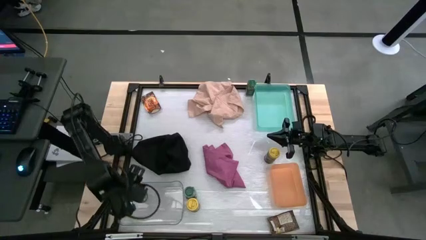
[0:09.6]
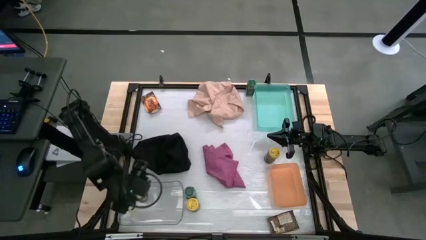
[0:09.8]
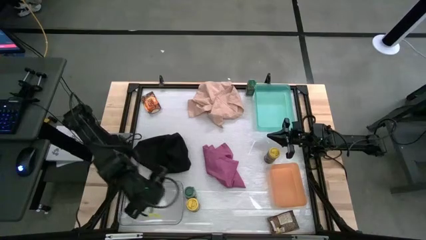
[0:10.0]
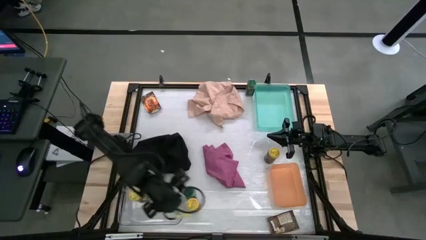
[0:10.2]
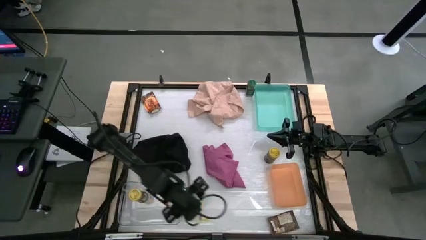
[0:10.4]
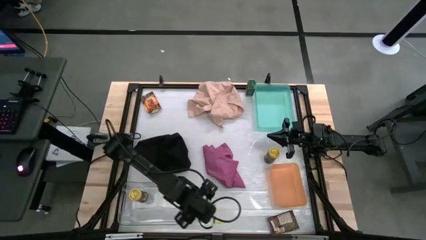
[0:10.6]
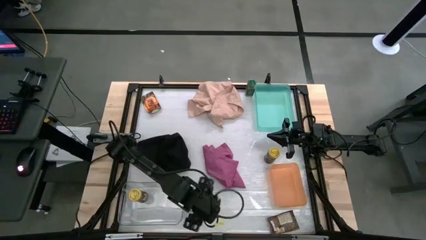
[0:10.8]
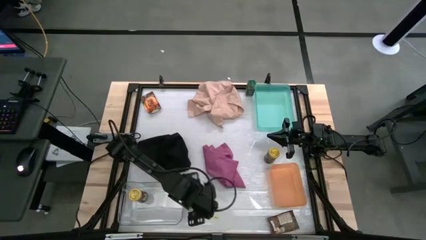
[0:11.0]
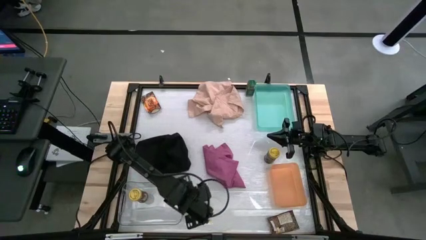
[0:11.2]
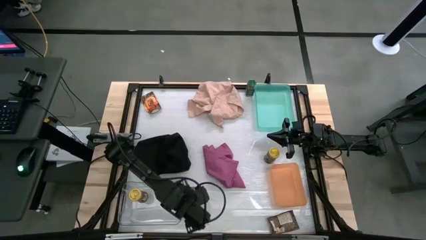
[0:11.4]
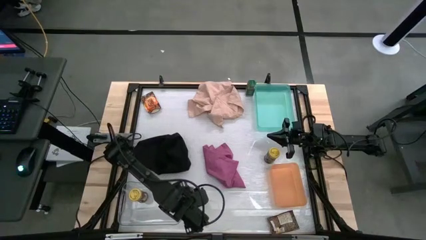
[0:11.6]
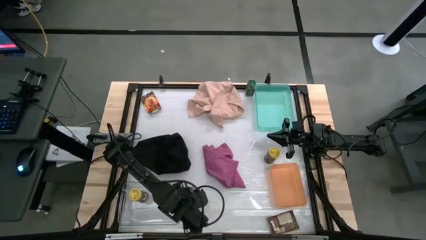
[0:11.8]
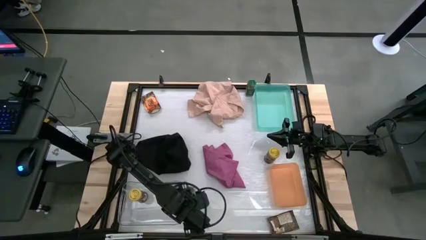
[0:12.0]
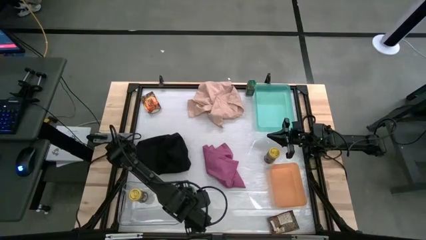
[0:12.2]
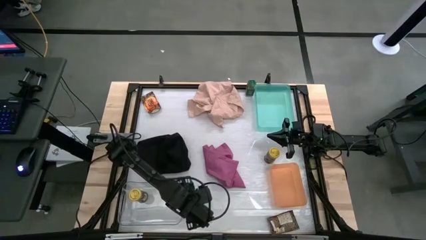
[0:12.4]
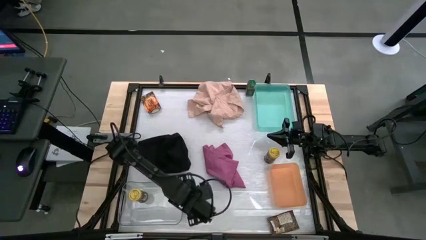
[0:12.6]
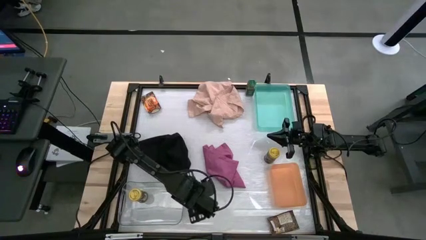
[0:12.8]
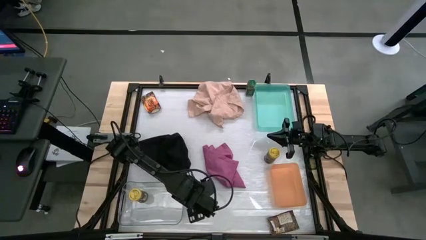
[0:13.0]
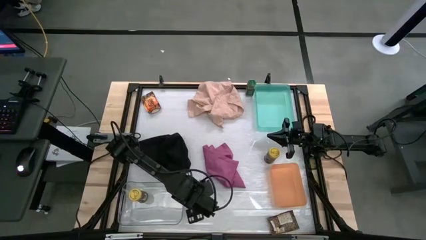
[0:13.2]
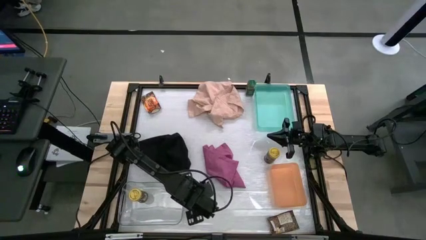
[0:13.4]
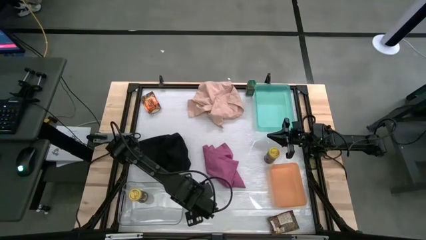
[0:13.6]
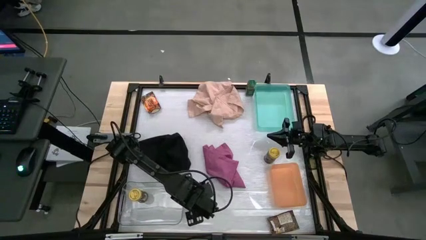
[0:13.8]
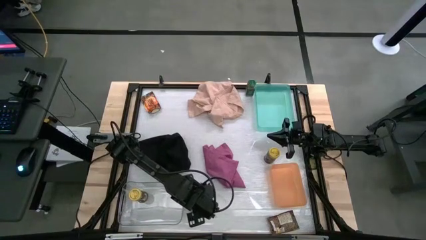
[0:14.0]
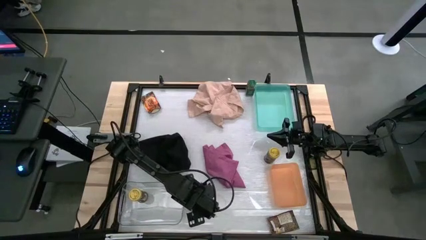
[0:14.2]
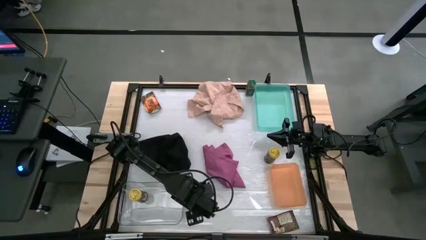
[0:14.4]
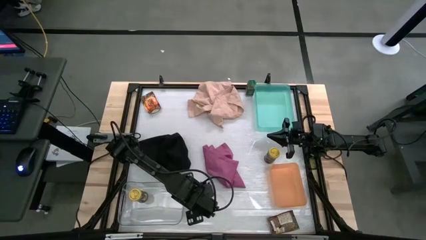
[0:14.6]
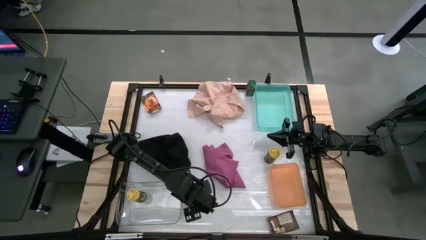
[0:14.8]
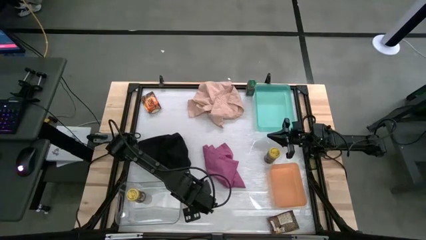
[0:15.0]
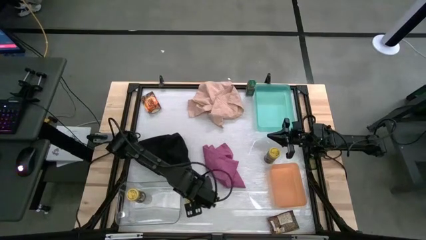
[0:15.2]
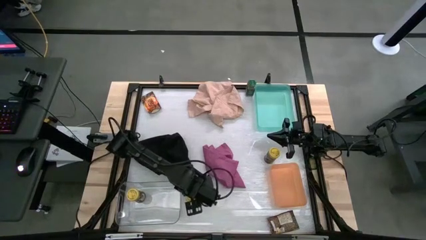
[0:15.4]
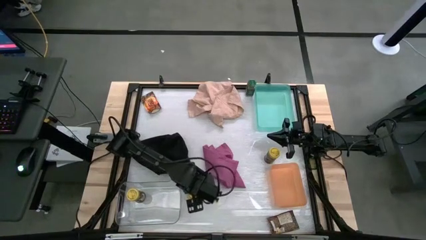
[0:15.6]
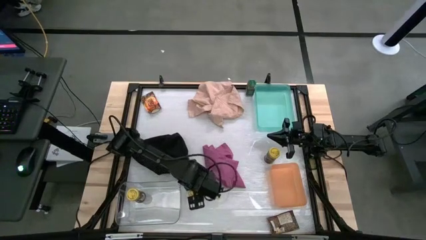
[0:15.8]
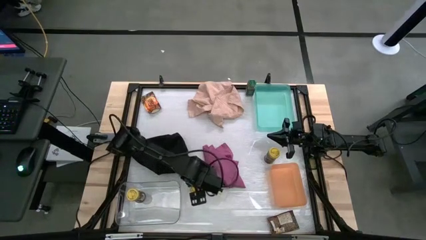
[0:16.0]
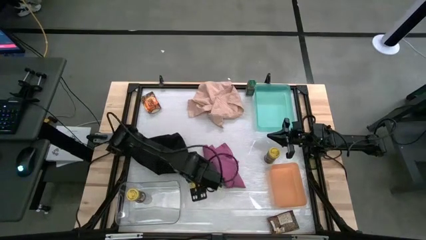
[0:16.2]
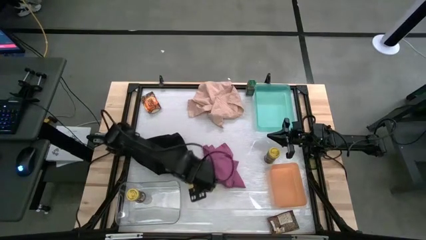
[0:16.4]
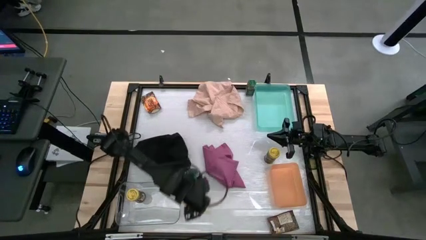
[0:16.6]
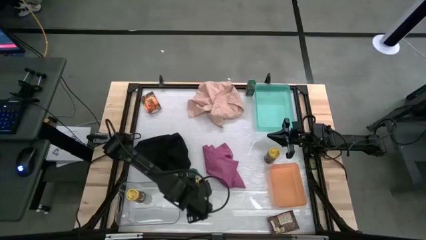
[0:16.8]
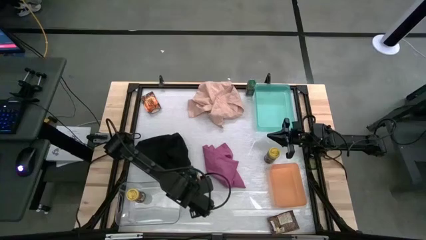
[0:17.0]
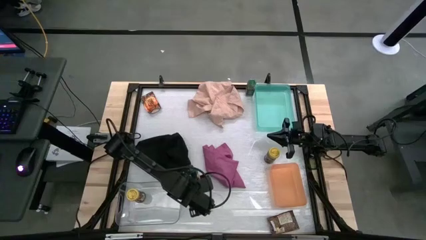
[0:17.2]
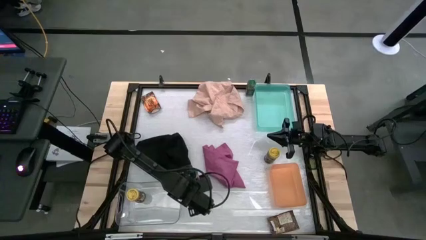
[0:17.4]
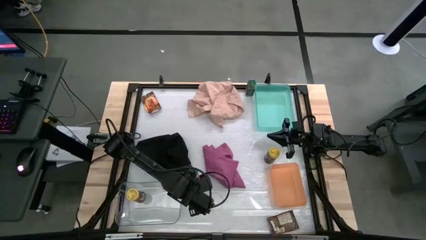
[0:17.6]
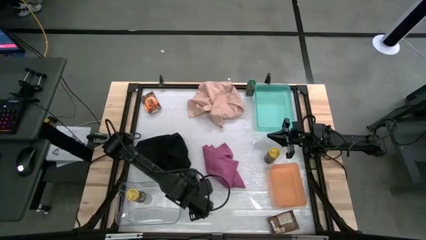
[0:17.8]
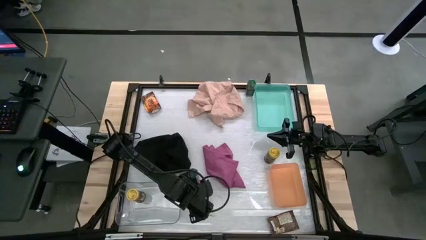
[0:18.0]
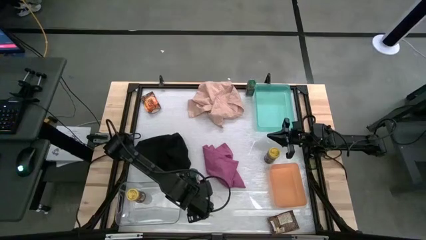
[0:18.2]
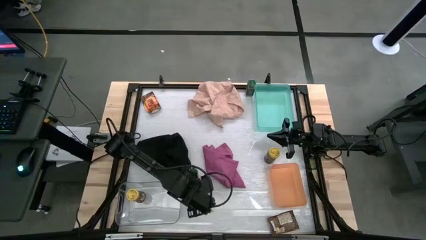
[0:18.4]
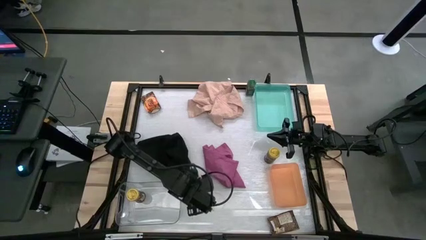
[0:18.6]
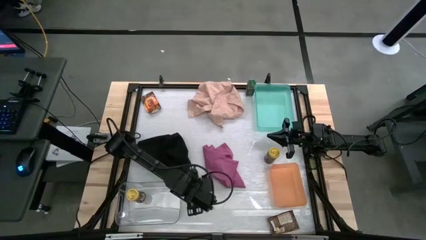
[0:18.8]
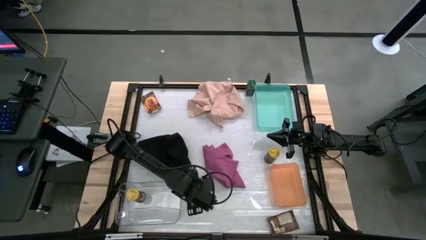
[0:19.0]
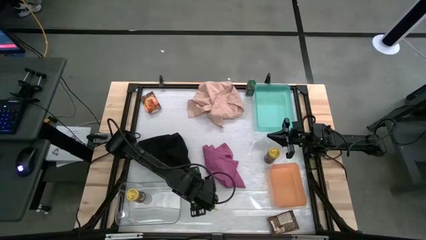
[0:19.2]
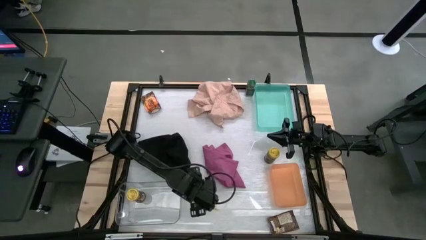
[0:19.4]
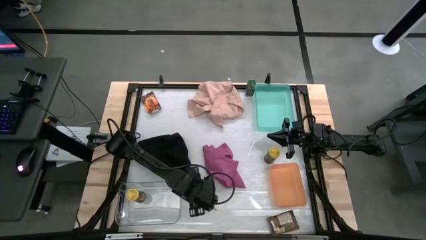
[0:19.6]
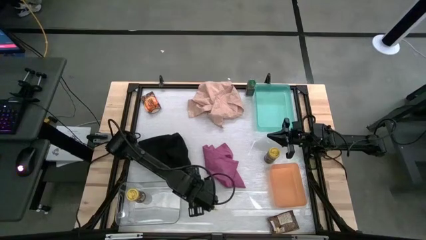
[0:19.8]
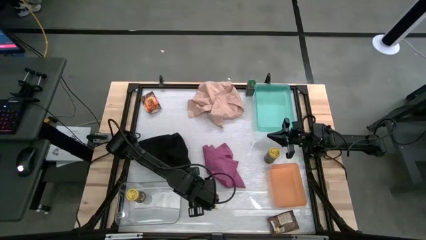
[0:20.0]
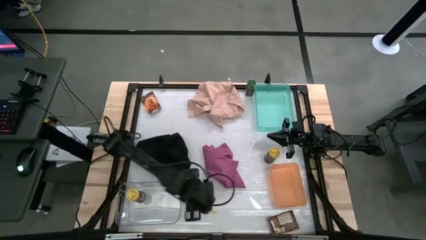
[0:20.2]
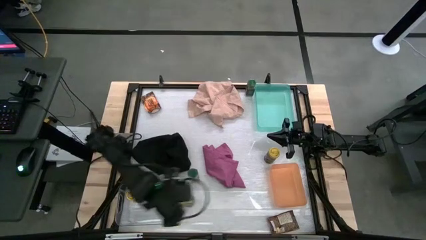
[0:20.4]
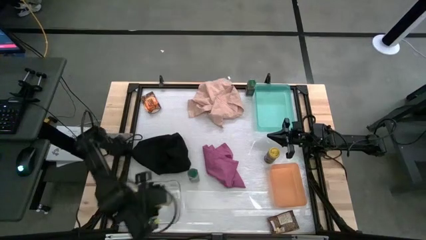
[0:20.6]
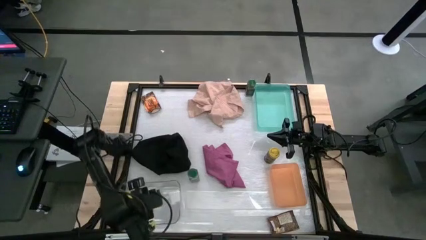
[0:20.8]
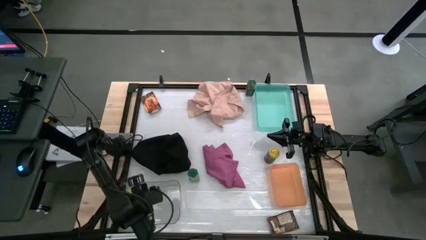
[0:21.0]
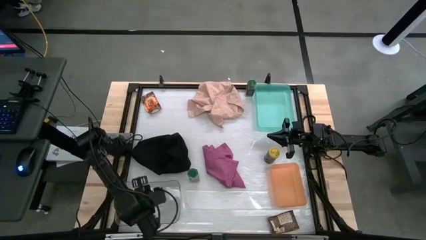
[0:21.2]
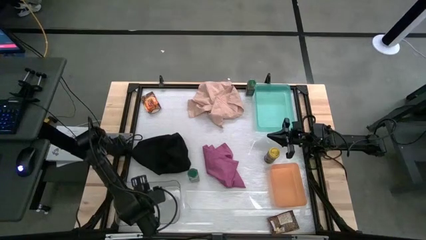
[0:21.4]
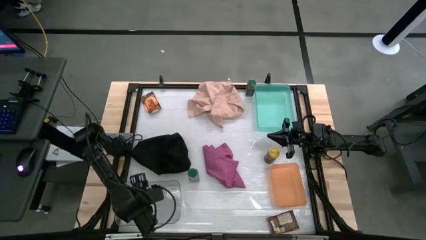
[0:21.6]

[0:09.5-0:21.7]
Task: Sort spices by type
Put the bottom yellow seasoning bottle into the transparent bin

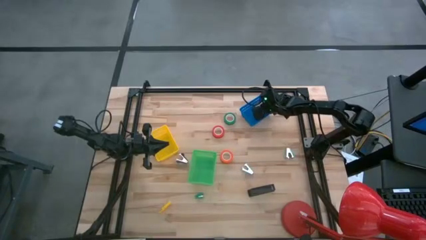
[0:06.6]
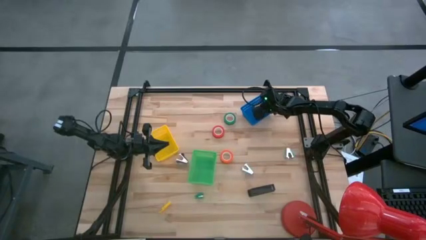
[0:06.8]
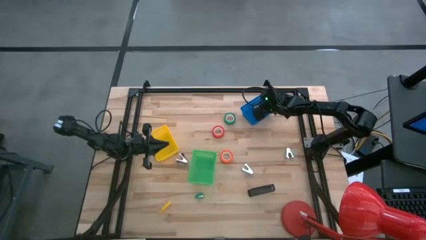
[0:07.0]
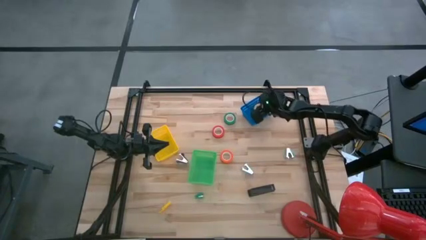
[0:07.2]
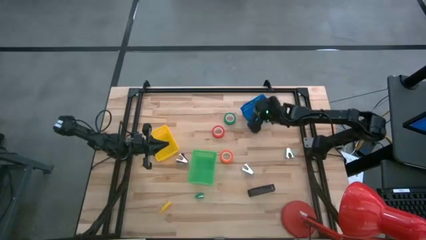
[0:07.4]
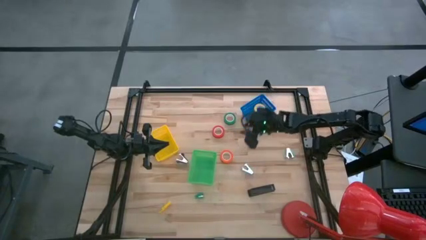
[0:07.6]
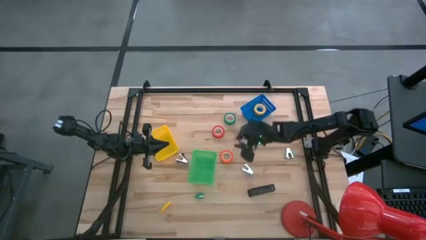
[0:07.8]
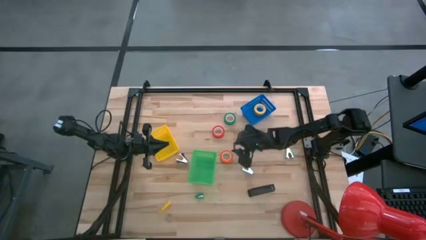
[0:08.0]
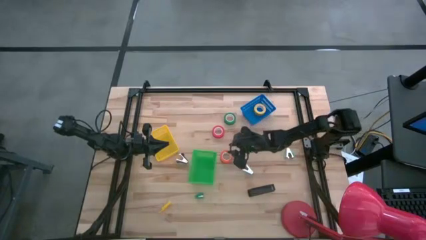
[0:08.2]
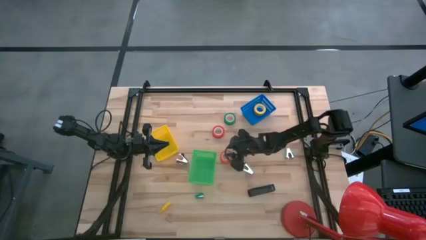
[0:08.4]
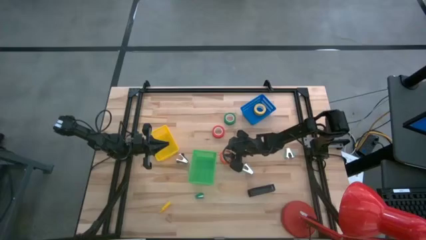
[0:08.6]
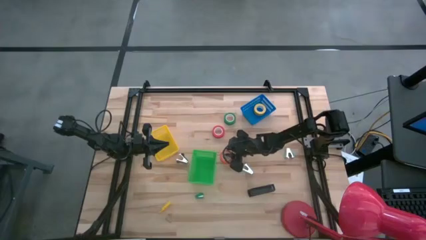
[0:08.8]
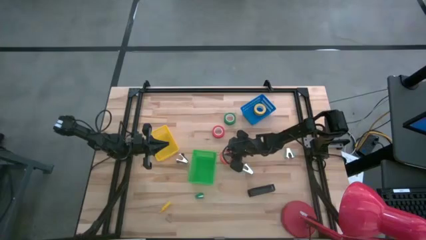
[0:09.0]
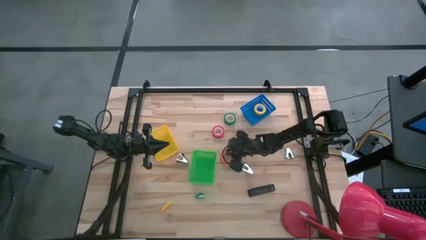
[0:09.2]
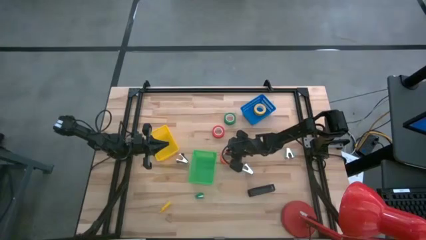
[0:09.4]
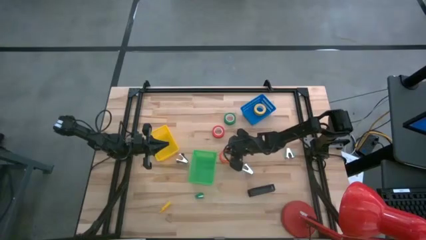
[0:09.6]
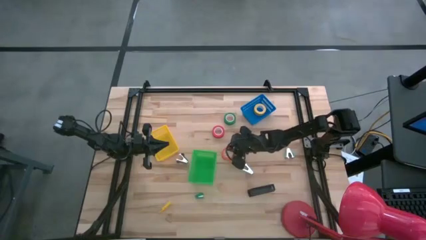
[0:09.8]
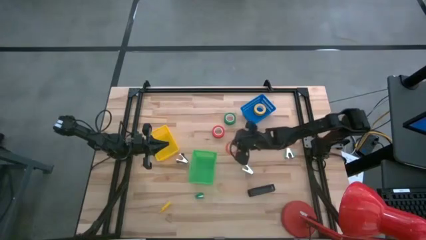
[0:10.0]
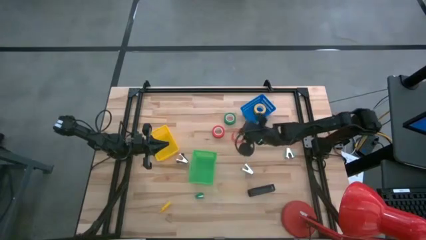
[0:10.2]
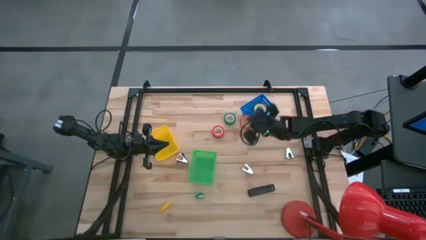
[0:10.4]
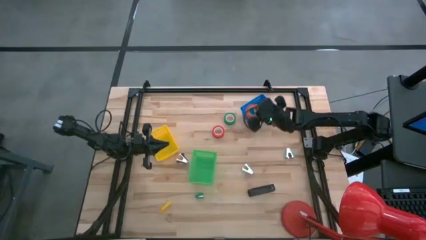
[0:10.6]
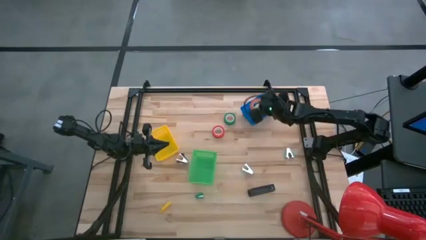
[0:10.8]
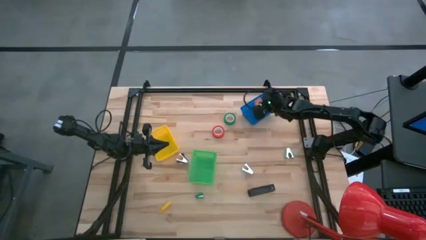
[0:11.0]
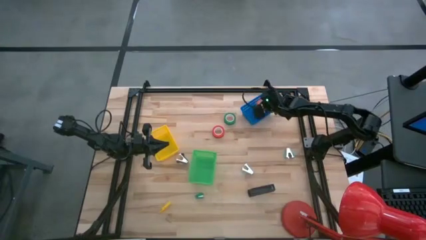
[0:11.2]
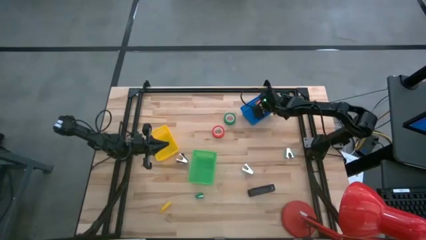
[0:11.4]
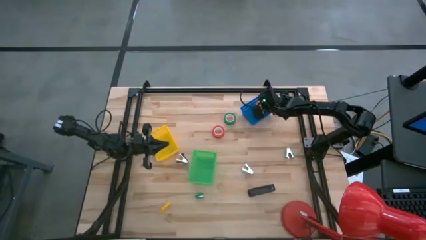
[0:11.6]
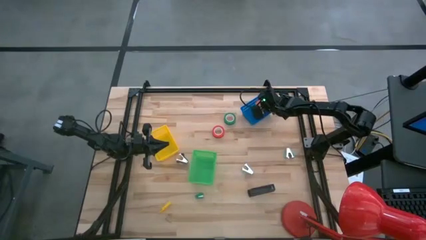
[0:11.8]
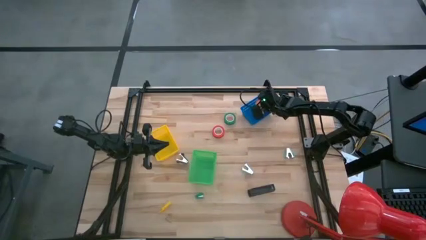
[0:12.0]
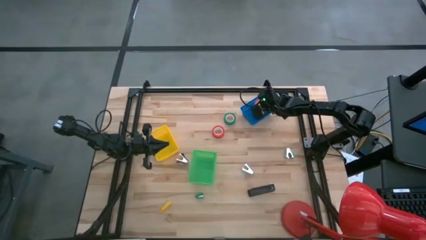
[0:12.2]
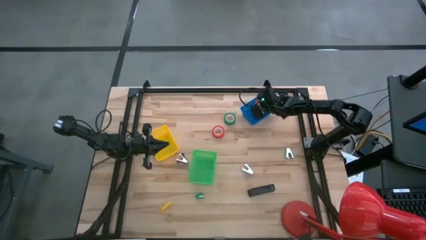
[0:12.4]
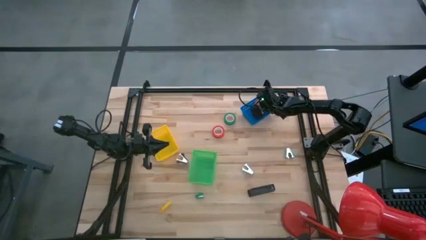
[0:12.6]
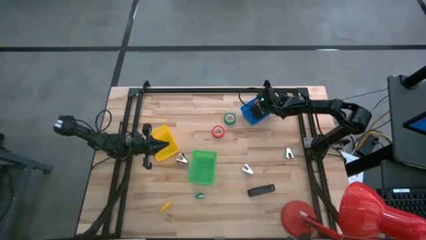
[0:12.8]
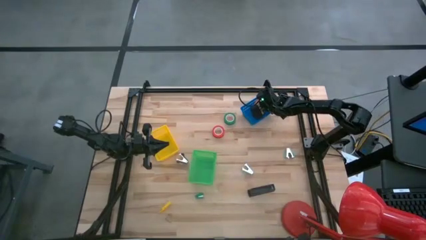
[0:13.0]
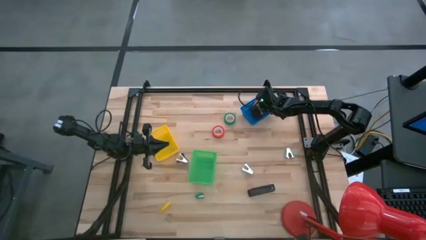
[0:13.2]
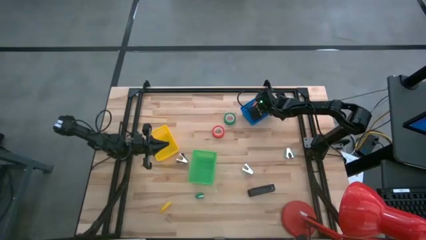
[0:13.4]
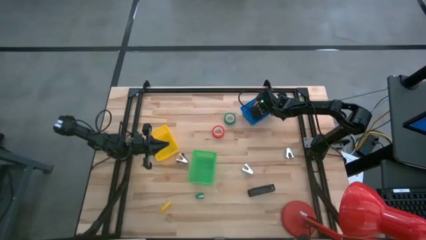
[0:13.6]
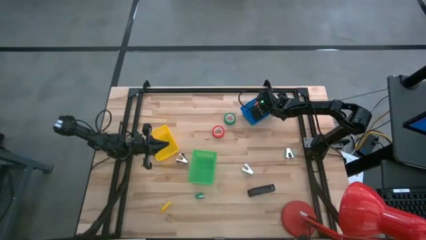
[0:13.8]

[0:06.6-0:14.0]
Task: Pick and place Stapler, Stapler remover, tape
Put the orange tape into the blue bin
